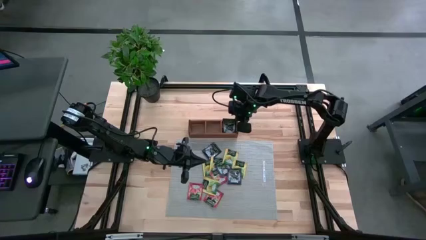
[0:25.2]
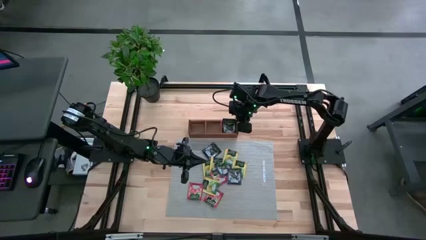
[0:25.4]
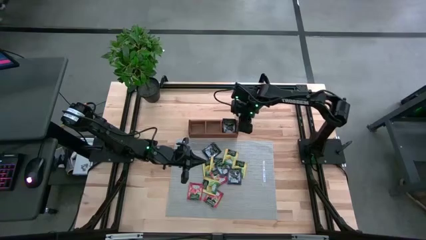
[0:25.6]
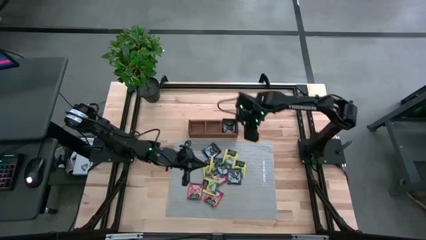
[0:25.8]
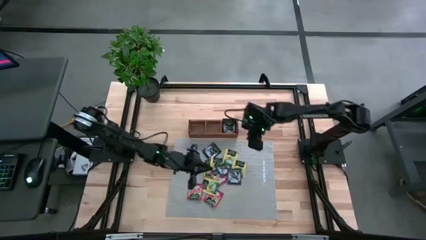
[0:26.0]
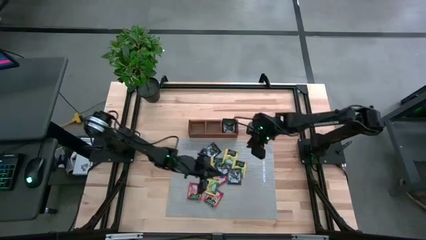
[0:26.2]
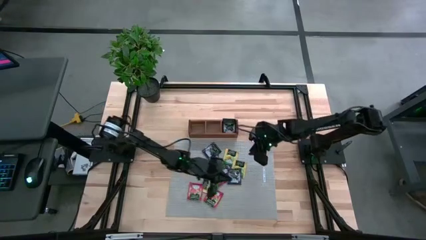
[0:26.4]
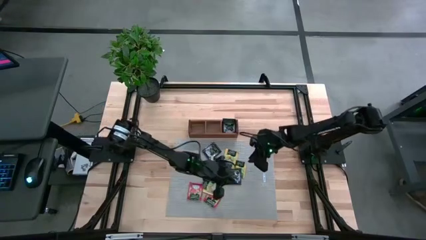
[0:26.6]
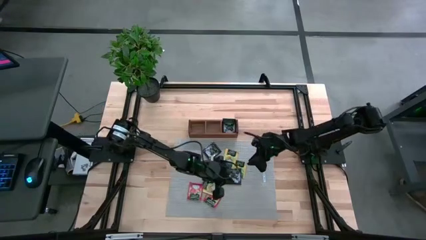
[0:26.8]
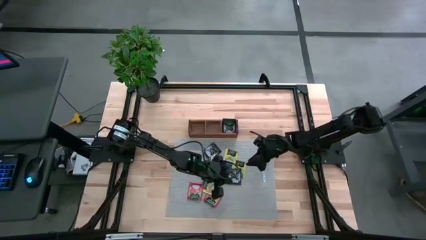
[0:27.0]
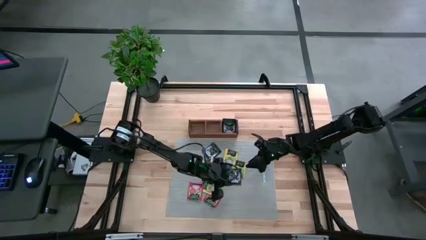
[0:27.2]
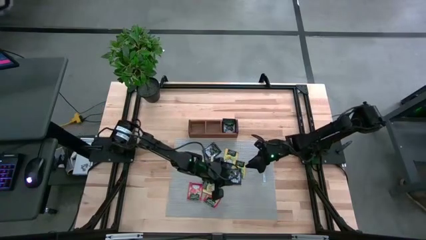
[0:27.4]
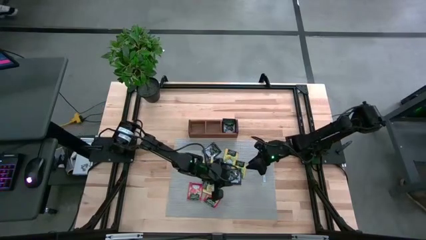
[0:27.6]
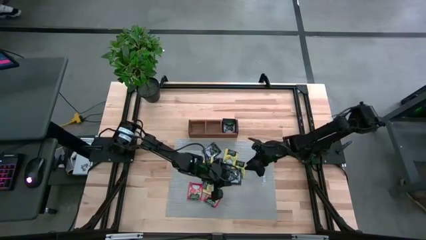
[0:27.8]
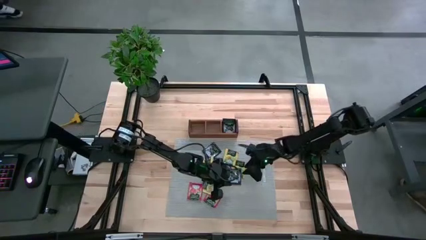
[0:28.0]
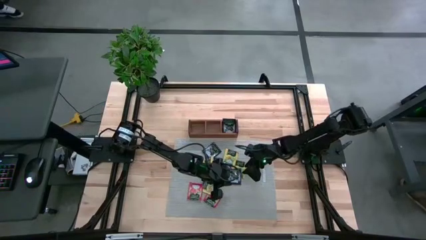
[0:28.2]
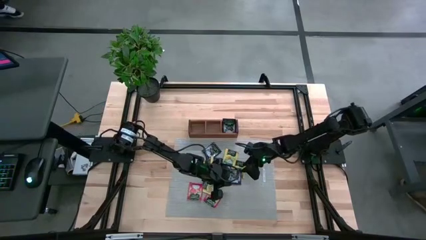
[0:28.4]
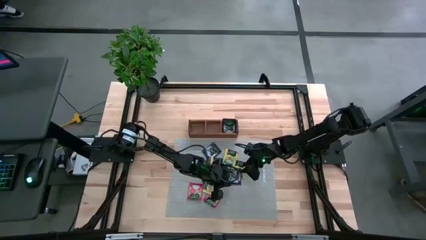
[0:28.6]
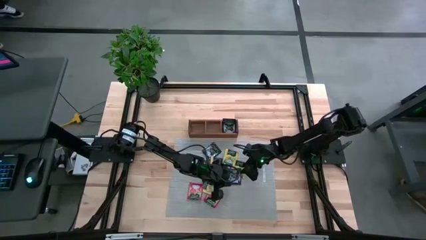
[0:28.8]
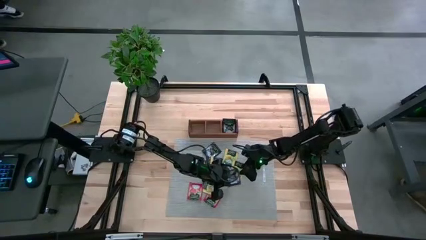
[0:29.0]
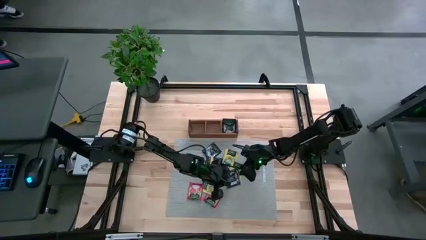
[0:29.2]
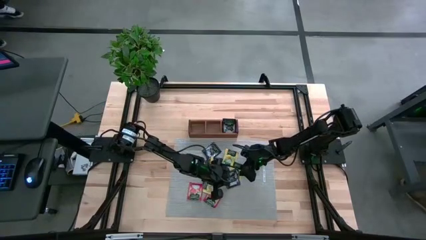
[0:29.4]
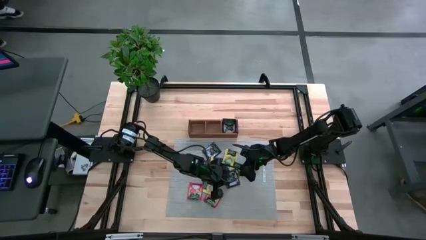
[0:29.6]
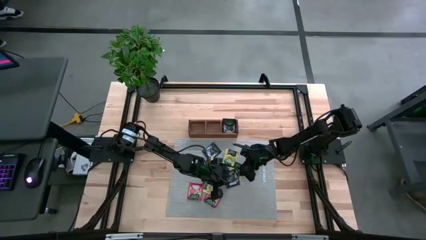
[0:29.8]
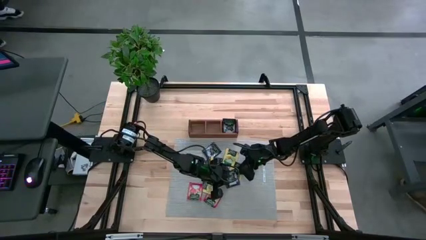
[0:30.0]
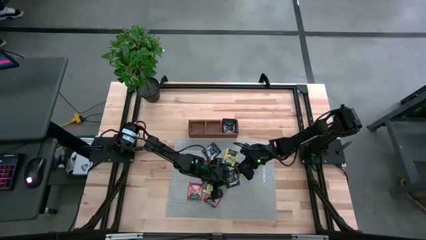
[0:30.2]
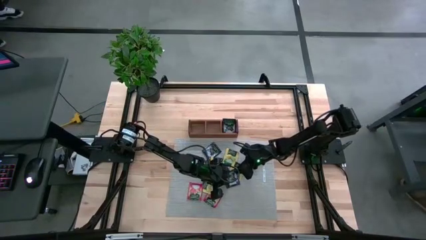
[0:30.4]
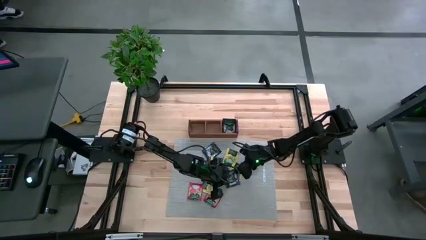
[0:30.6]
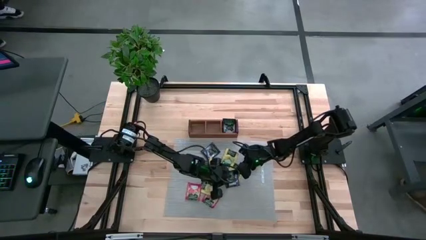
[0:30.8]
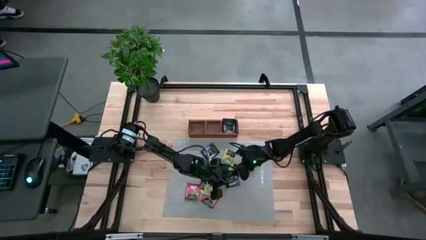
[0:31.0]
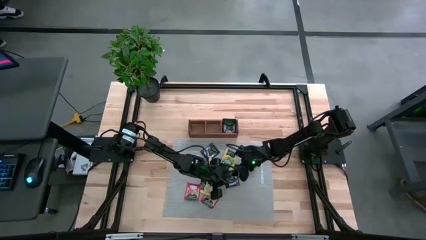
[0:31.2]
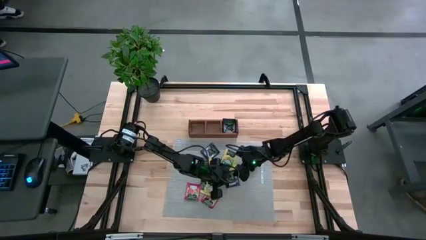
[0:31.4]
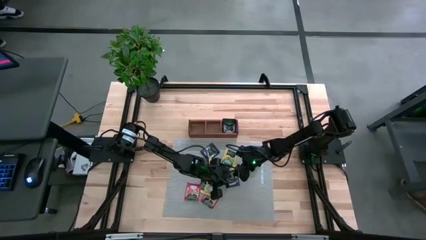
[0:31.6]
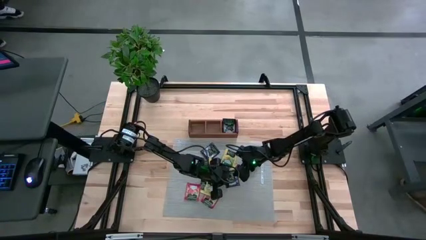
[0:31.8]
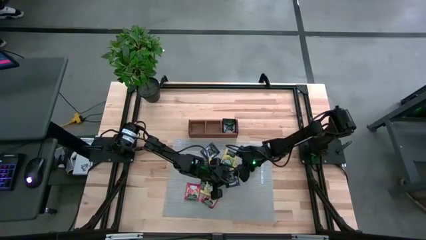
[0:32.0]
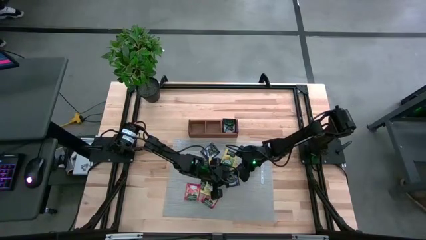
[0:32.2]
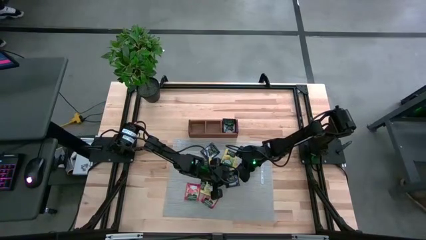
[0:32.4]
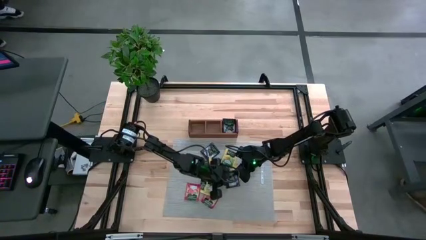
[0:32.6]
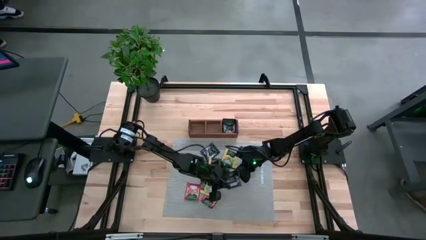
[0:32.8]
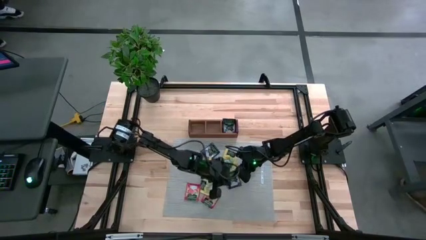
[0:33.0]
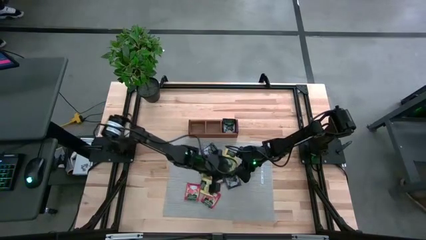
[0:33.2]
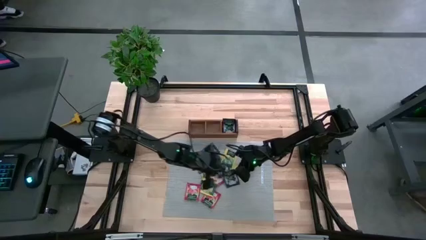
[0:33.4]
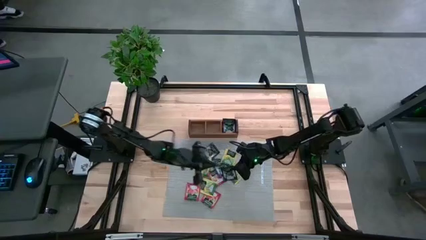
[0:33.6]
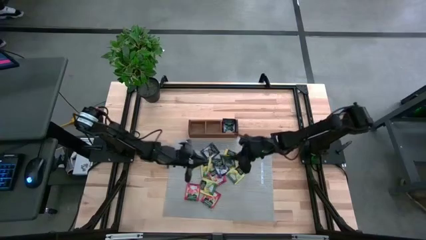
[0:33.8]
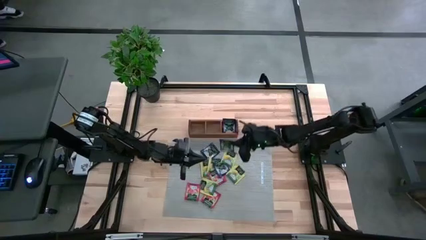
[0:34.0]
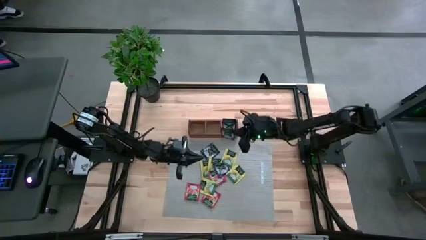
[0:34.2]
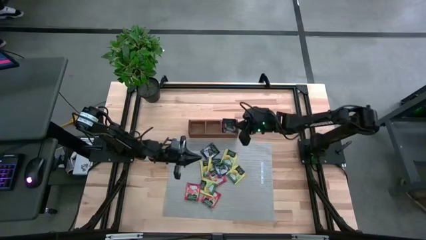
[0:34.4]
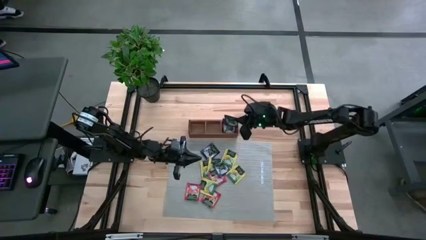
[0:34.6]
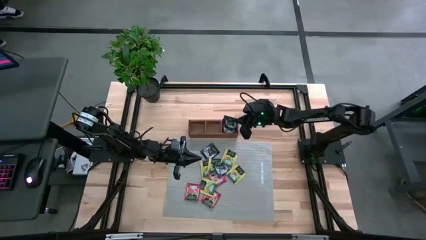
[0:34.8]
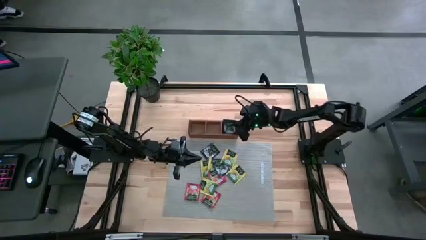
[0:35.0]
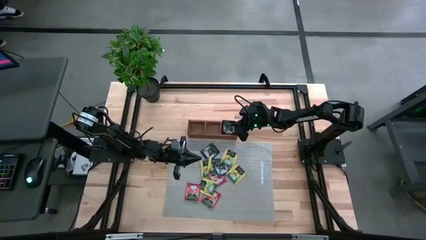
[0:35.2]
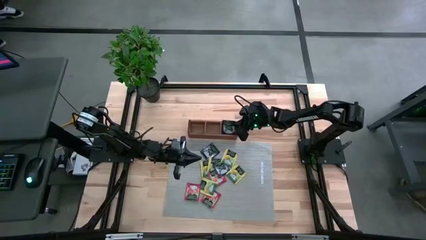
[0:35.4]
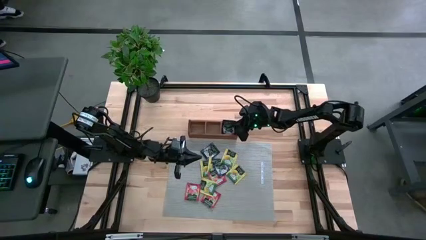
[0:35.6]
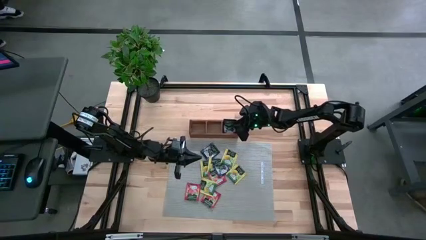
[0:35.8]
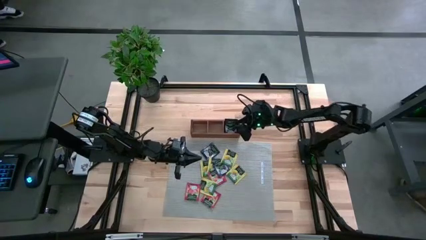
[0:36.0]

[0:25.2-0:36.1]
Task: Pick & Place Tea
Put the violet tea bag into the right section of the wooden organizer

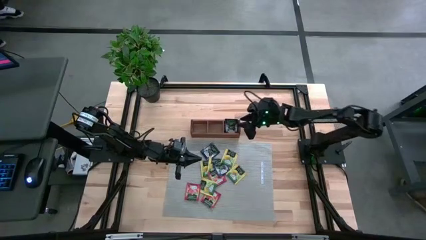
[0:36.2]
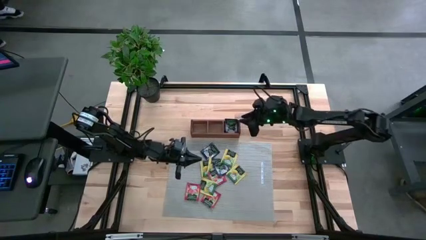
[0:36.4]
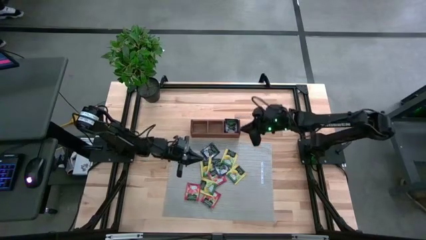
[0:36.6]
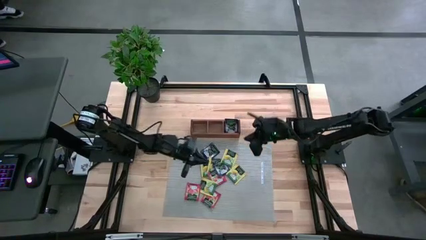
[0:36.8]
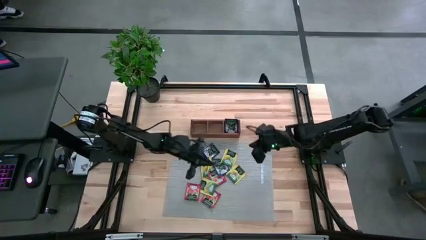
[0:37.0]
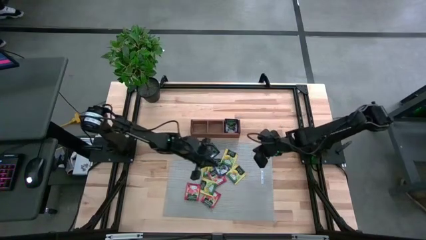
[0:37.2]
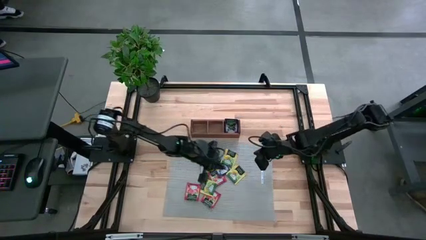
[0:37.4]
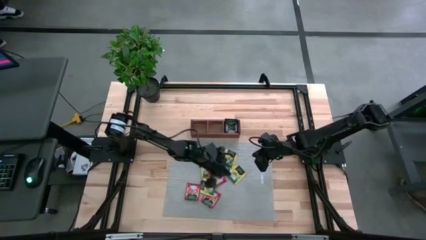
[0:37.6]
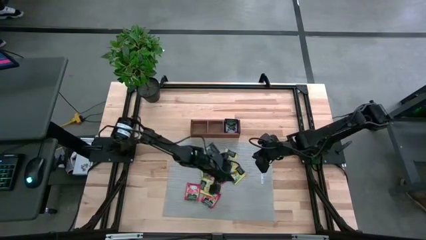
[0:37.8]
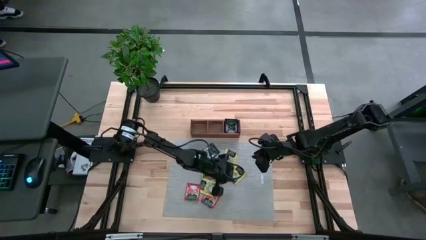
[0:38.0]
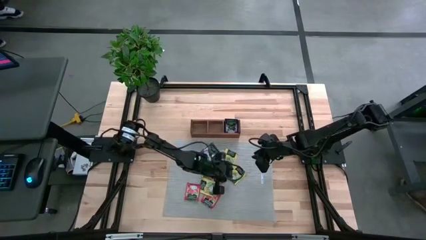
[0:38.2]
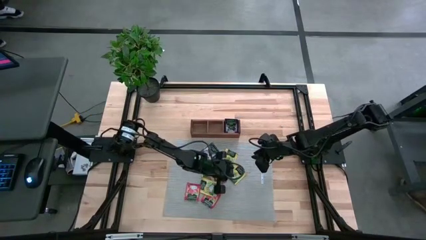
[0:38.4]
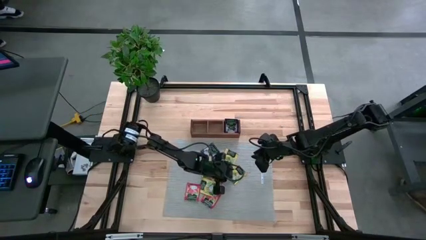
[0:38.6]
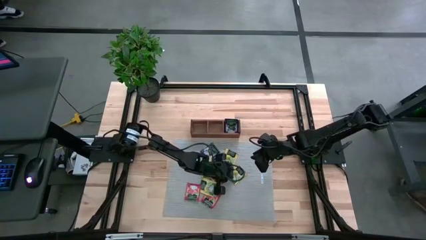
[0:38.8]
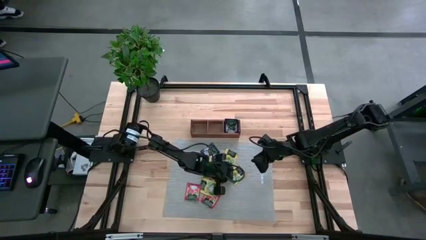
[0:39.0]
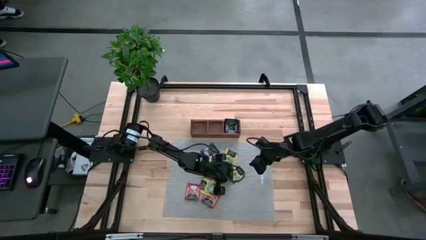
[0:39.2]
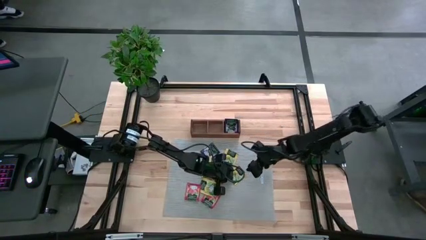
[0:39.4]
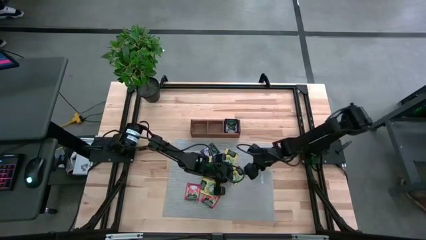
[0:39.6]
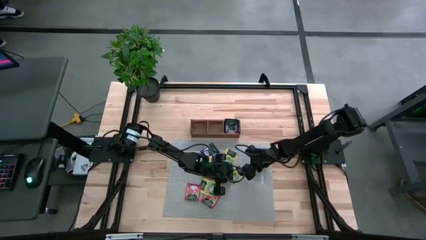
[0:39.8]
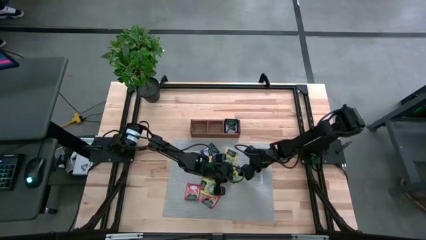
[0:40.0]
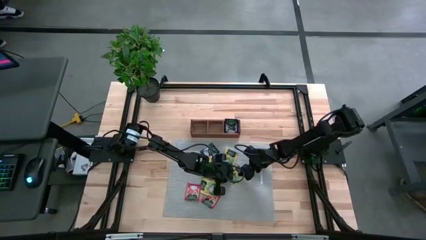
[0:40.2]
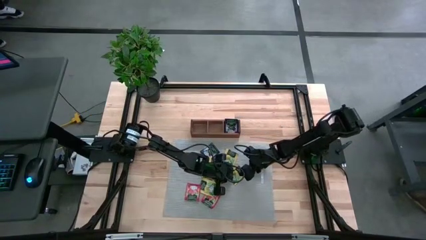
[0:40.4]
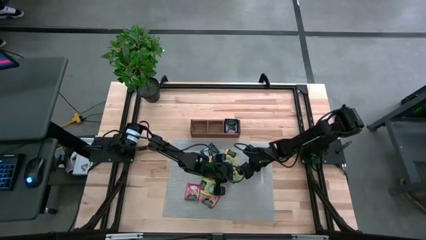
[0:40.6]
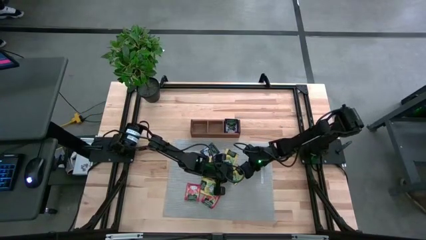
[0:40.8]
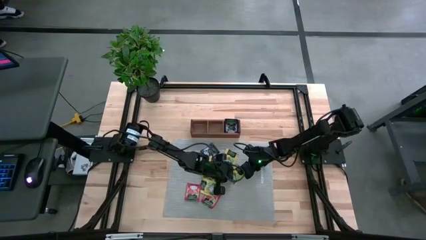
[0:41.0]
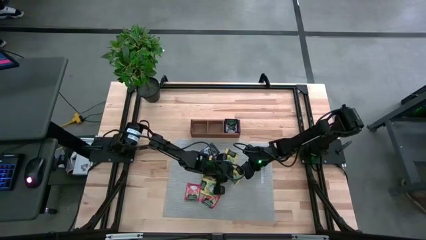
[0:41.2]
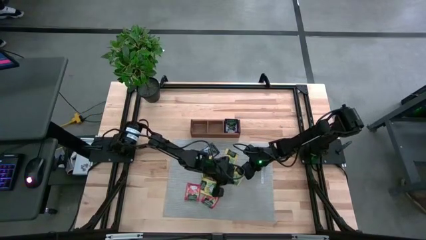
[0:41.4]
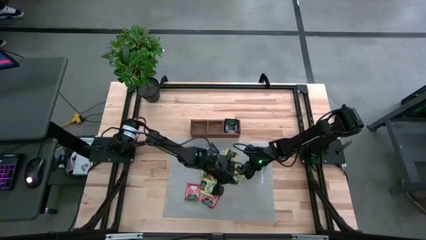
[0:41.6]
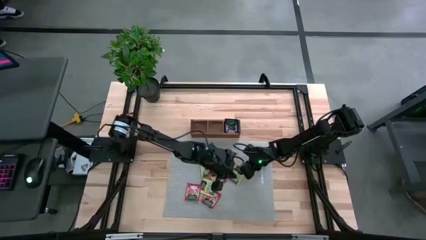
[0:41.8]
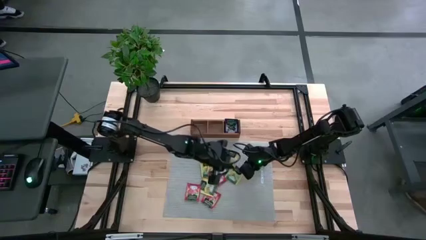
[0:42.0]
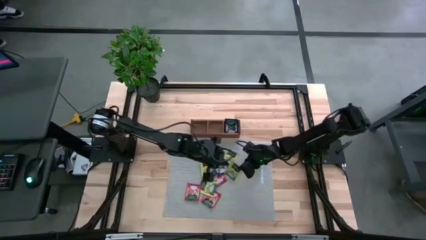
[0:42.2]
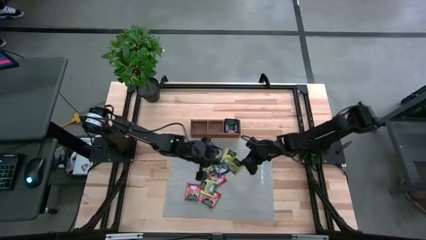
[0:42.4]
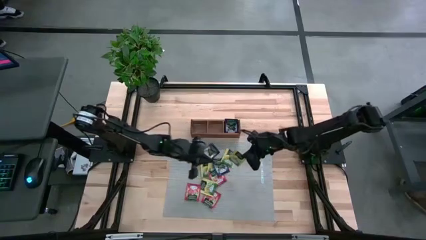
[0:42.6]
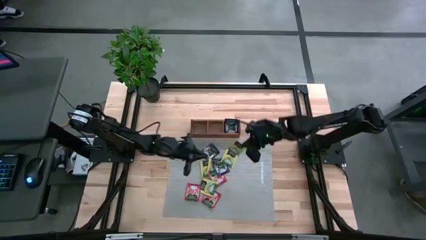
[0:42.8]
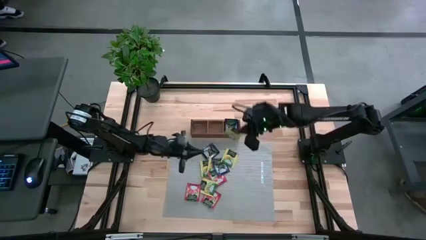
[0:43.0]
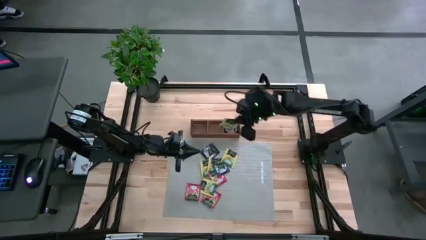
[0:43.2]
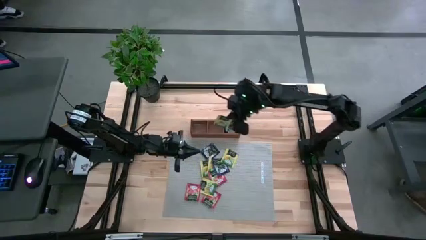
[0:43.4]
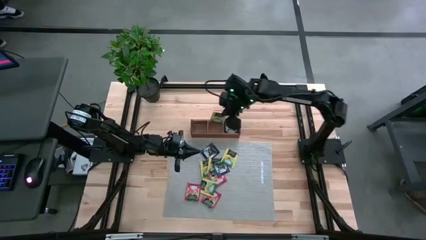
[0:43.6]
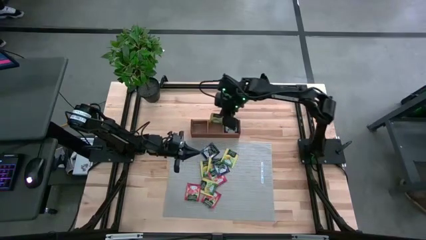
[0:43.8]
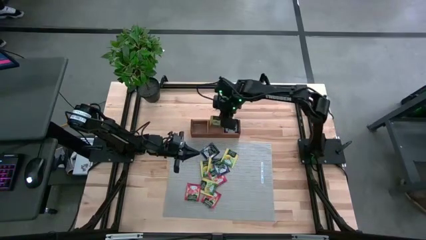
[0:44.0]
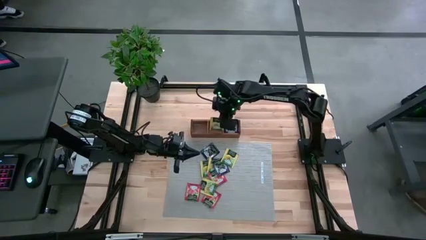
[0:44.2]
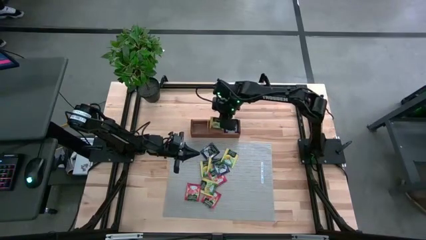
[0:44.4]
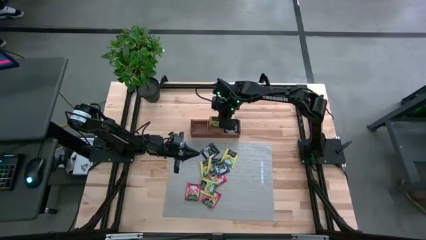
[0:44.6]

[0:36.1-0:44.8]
Put the yellow tea bag into the middle section of the wooden organizer
